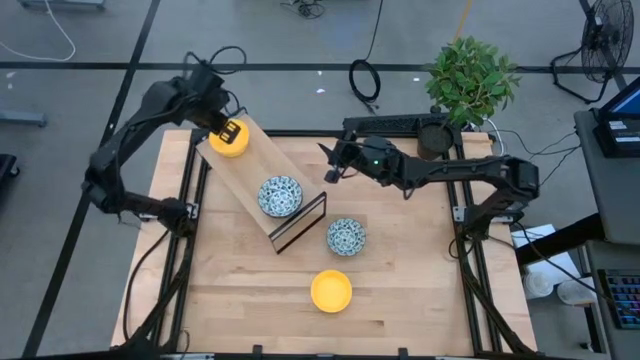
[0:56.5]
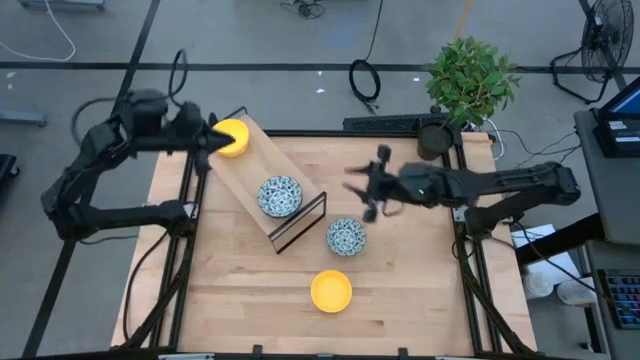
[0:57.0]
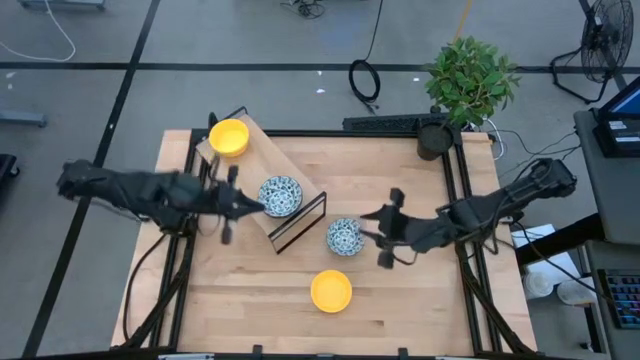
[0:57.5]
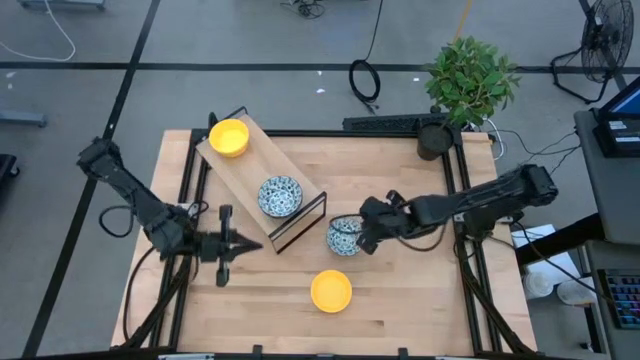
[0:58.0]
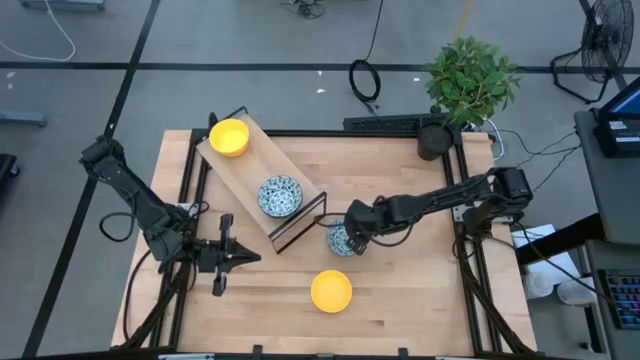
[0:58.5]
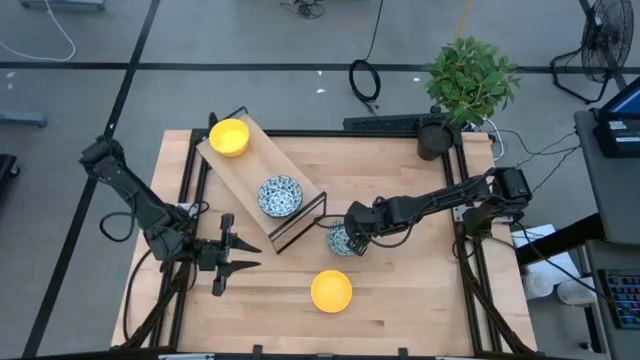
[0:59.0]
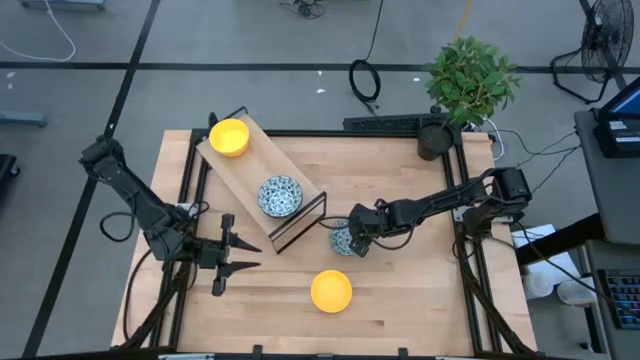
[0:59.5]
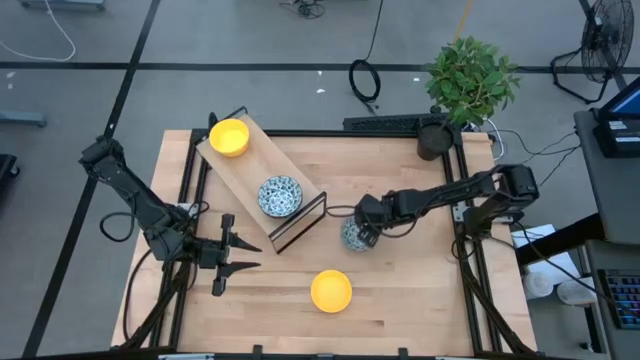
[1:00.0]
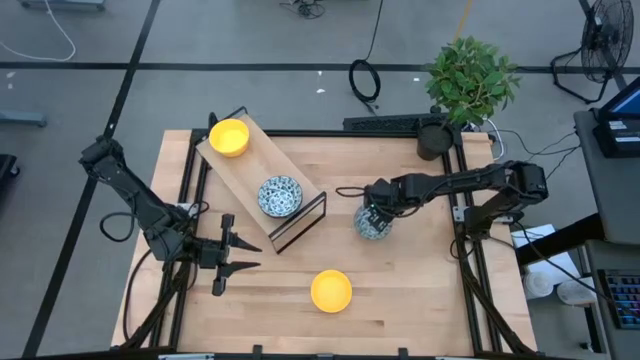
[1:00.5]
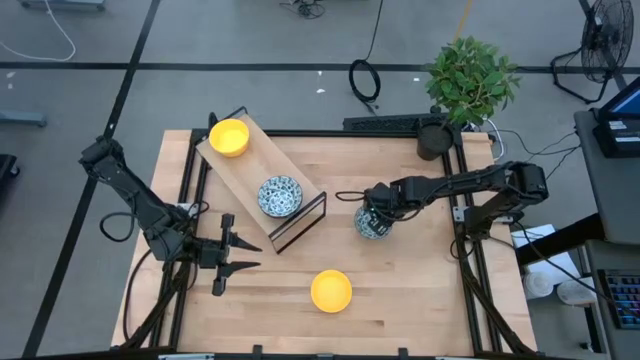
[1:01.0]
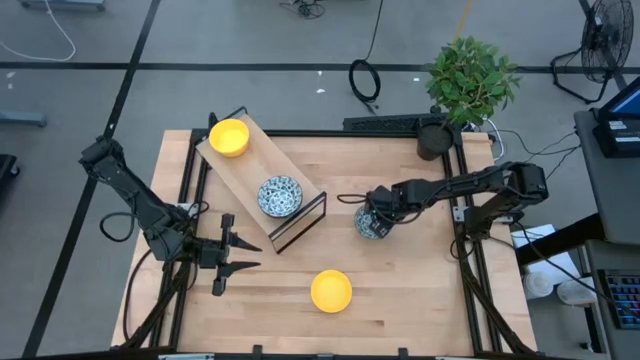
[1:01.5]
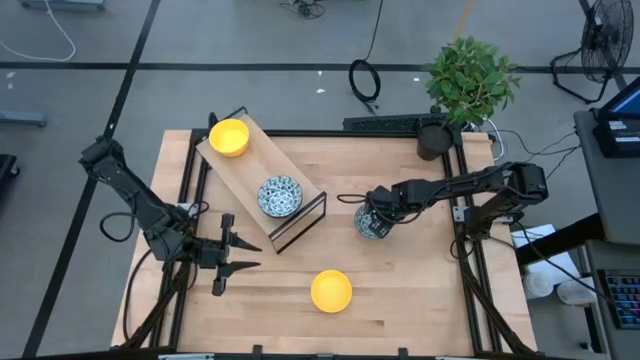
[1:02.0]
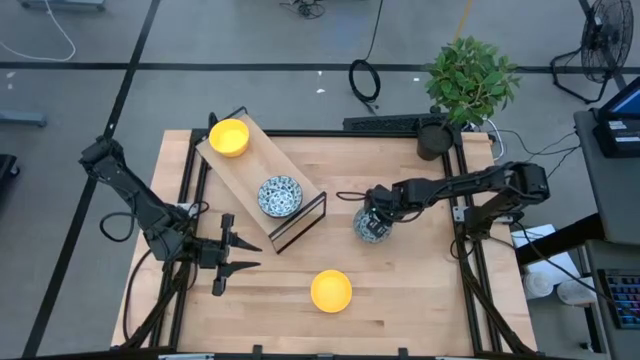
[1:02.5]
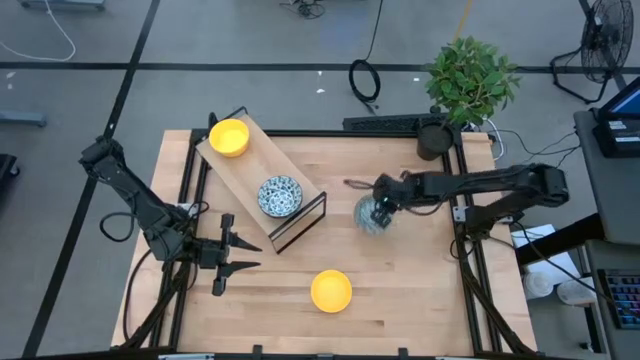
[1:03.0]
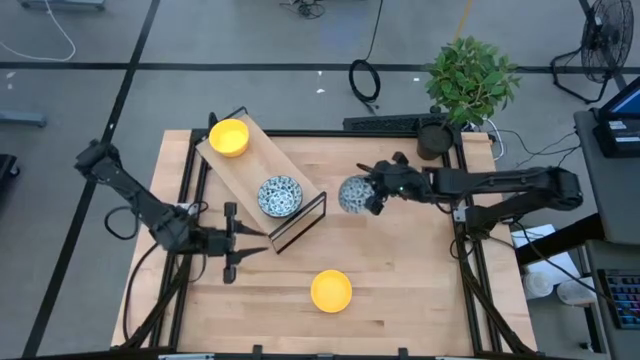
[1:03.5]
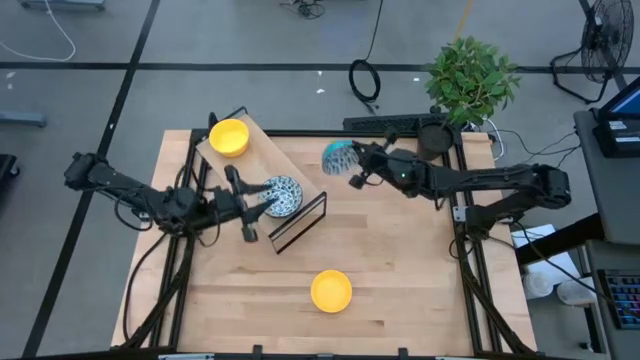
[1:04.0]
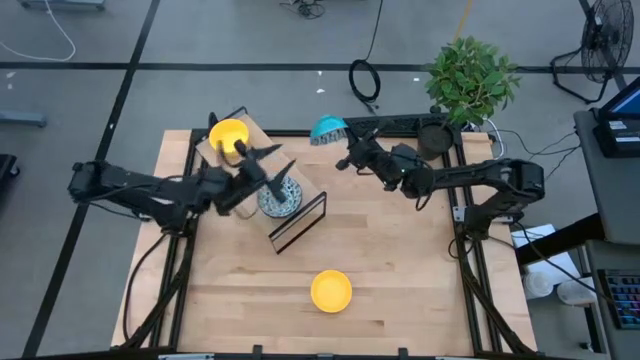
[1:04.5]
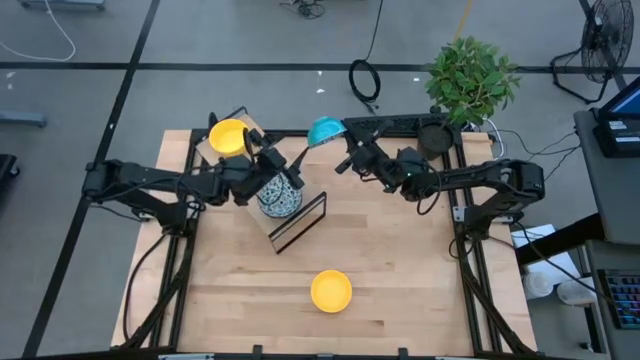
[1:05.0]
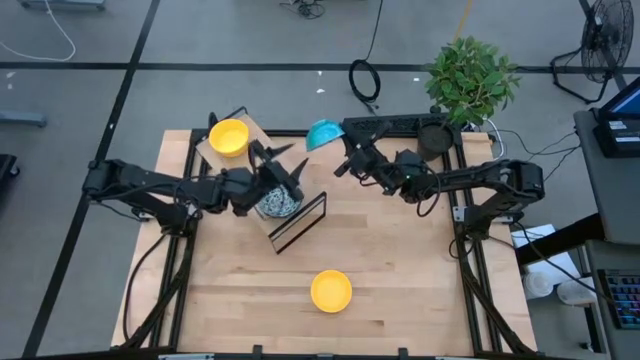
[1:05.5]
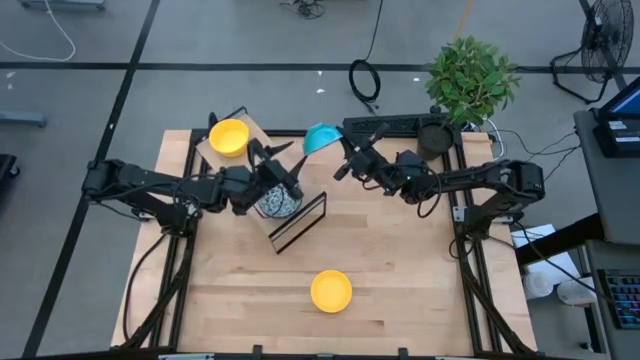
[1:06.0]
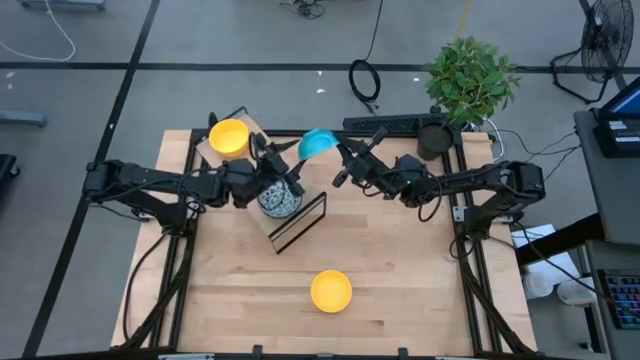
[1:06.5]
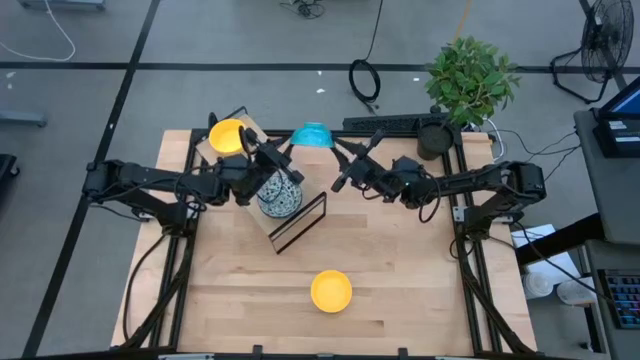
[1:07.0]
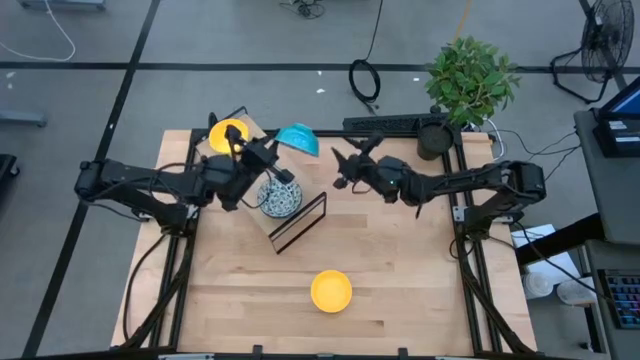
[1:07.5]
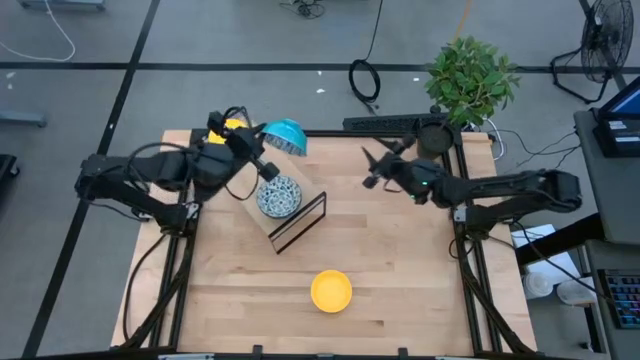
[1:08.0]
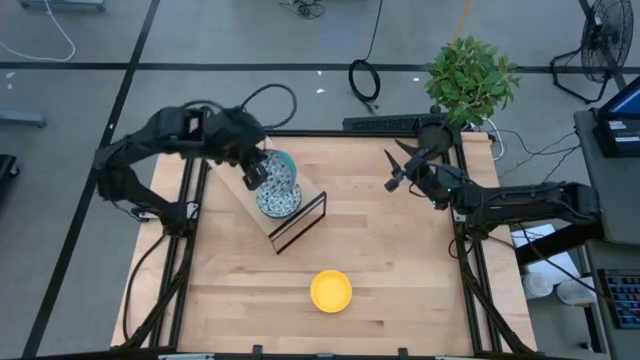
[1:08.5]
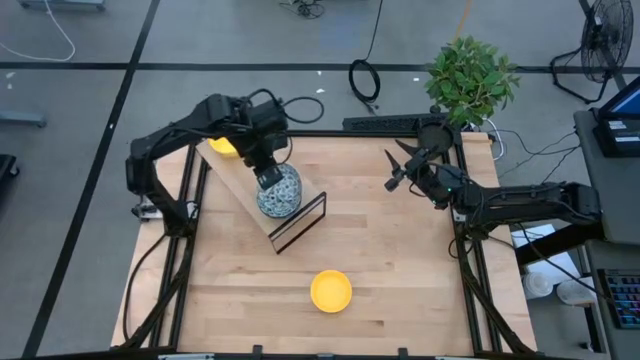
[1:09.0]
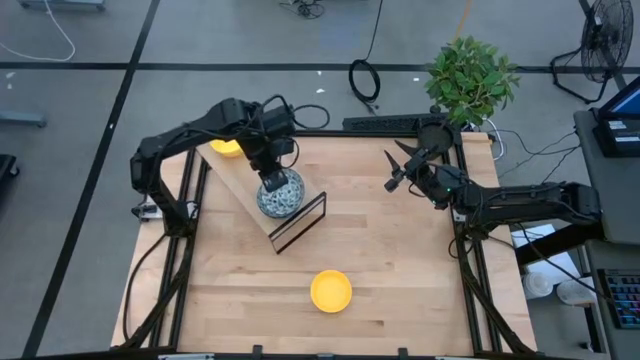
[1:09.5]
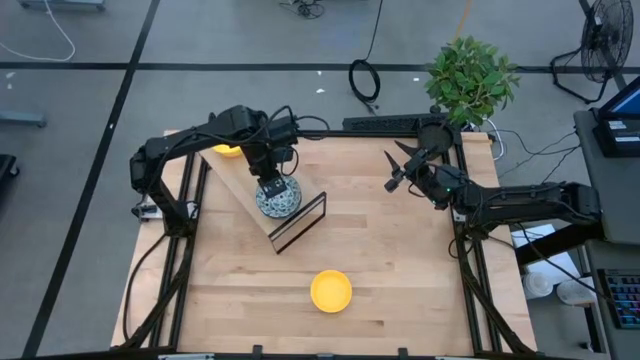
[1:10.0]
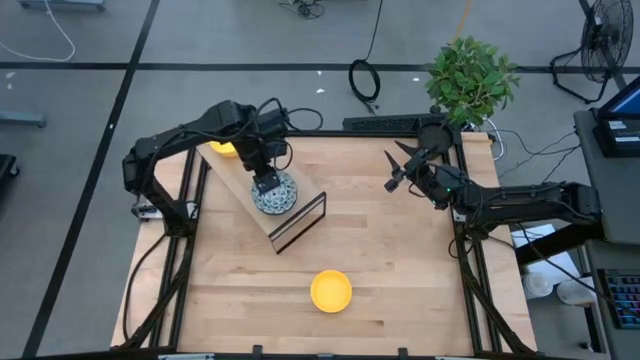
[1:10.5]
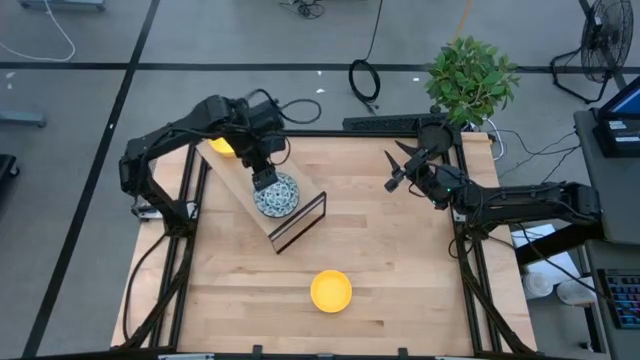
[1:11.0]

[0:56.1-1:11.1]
Task: Pick & Place Mini bowls
Stack the green patterned bowl on the green patterned bowls on the shelf

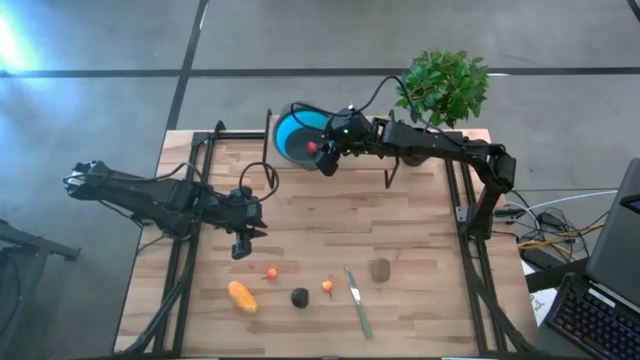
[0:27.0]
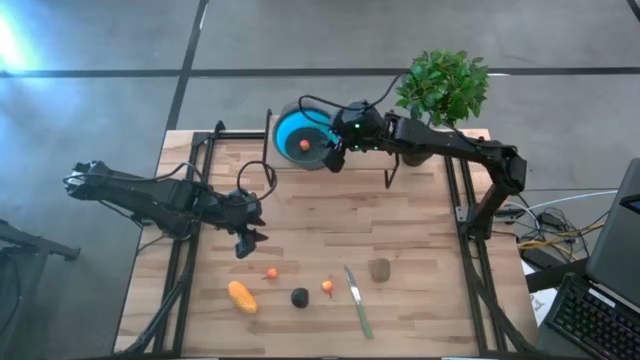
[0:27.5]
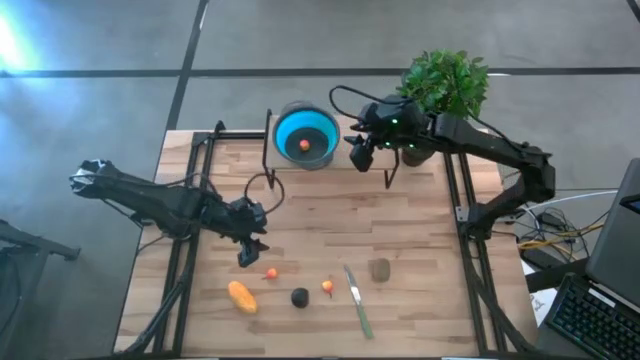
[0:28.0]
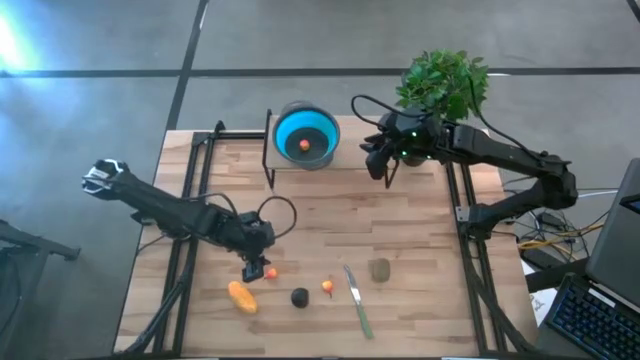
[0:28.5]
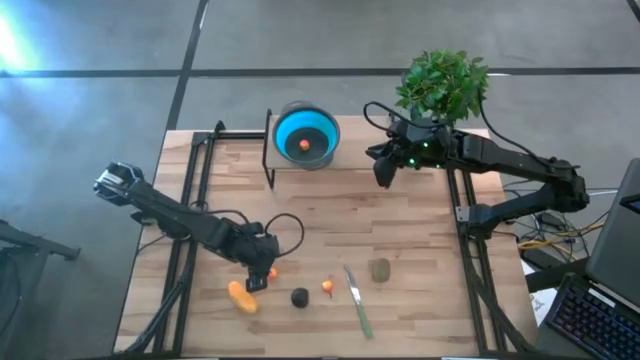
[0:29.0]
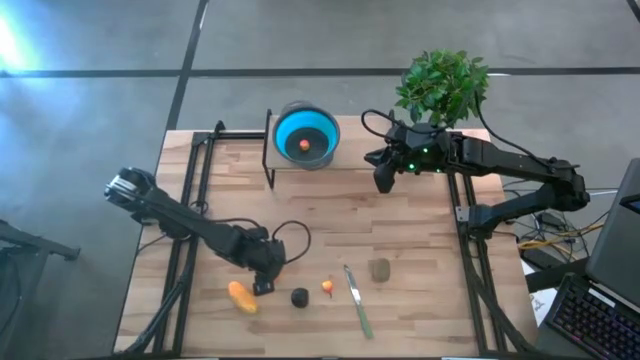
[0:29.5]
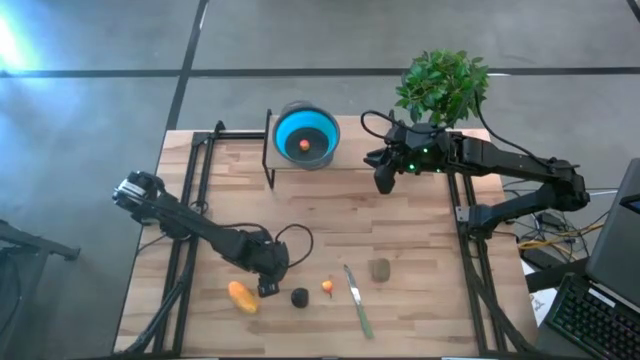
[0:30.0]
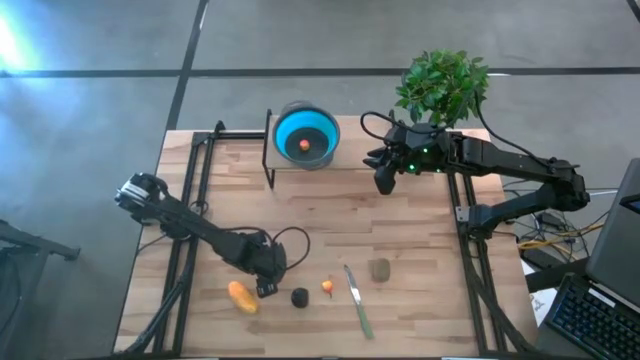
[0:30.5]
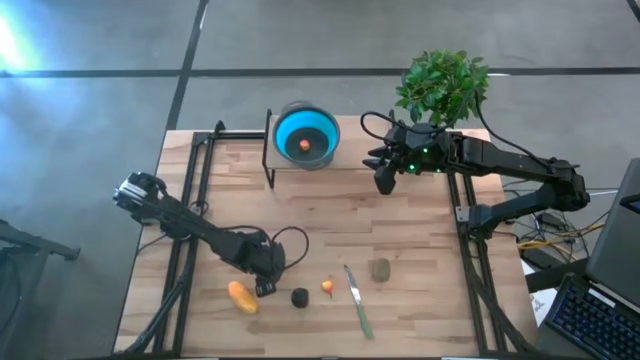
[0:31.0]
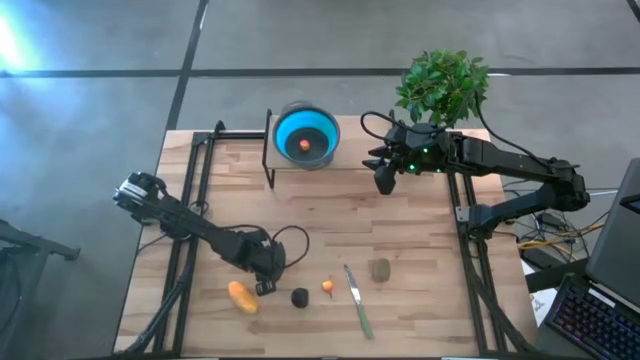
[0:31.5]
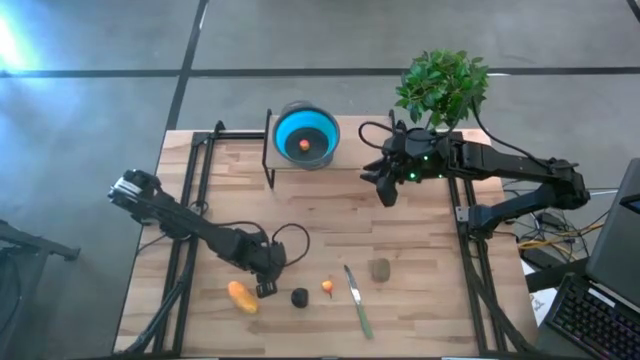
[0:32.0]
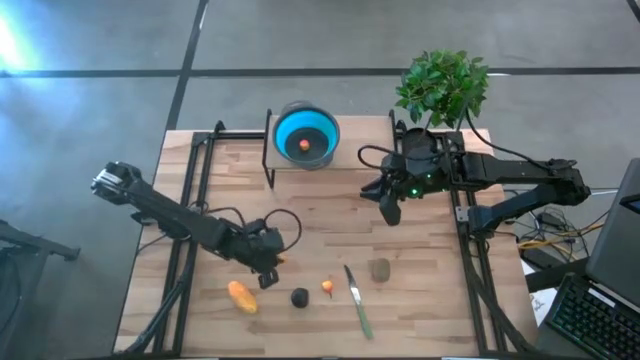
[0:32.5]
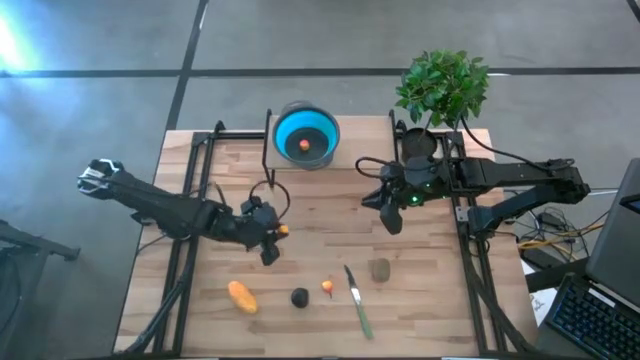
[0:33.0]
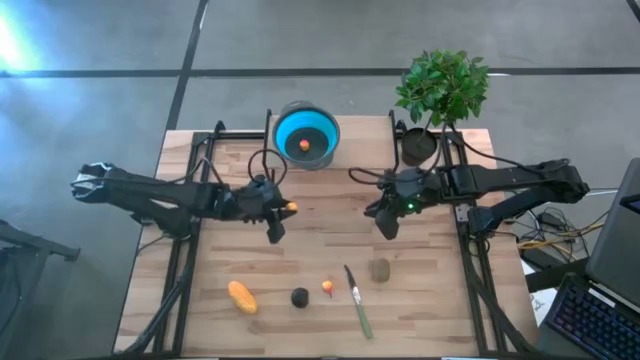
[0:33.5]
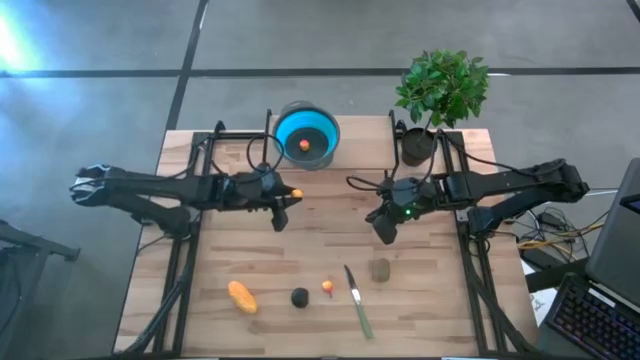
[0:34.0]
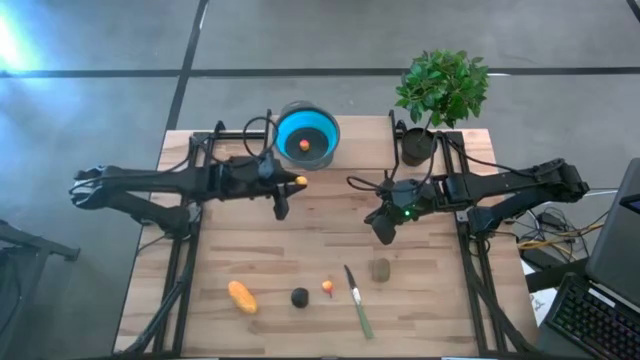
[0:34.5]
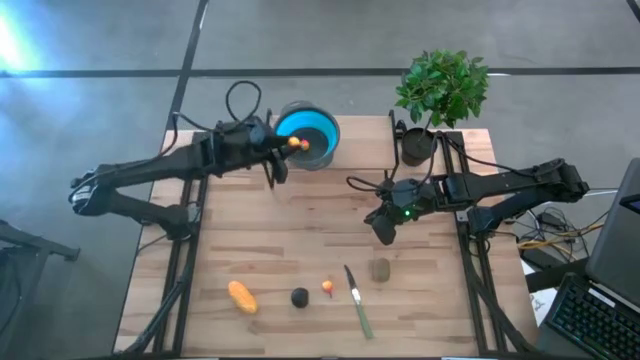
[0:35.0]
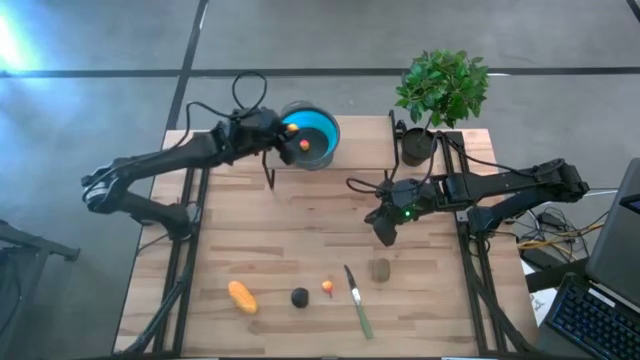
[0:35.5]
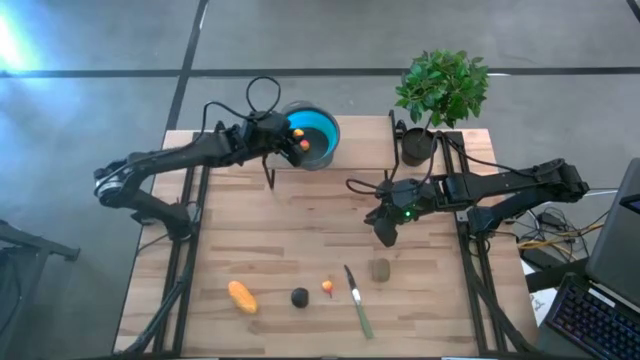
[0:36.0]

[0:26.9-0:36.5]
Task: Pick & Place Fruit
Put the left orange pear into the blue strainer bowl
